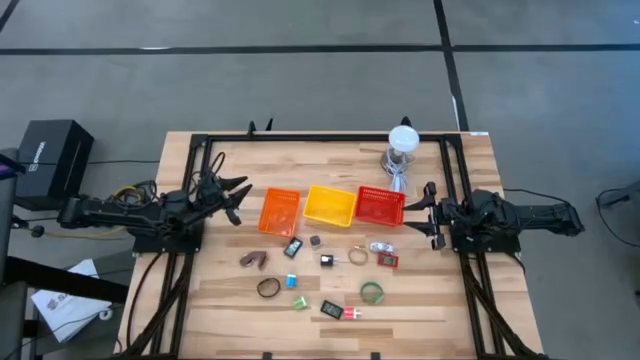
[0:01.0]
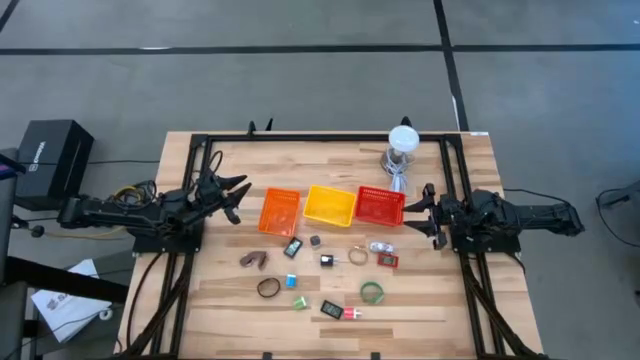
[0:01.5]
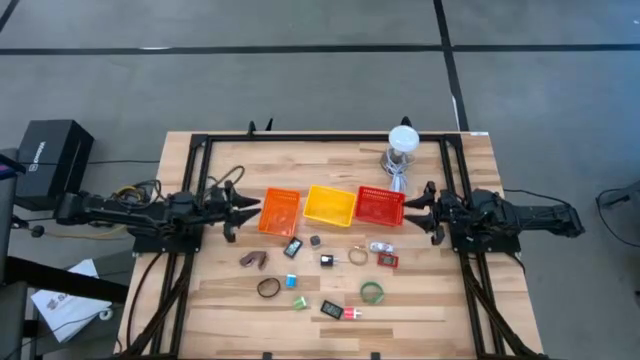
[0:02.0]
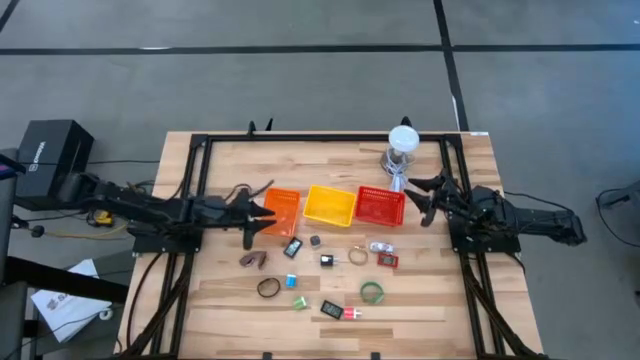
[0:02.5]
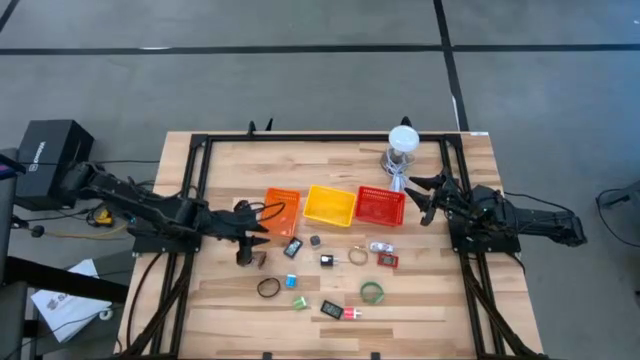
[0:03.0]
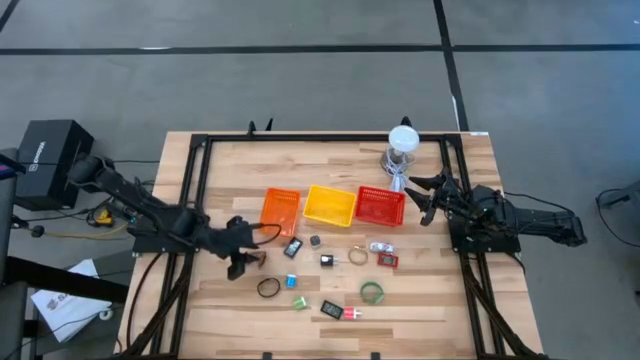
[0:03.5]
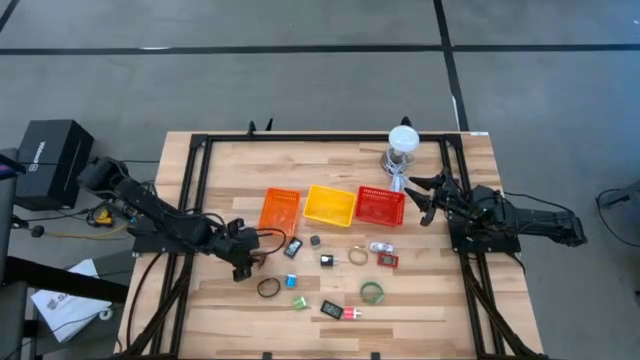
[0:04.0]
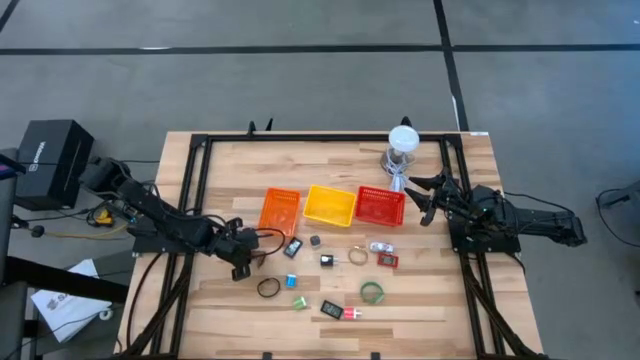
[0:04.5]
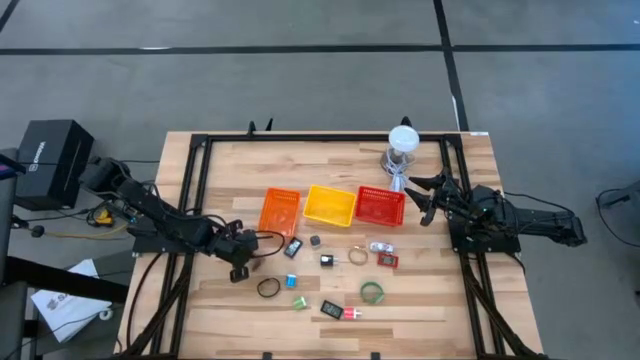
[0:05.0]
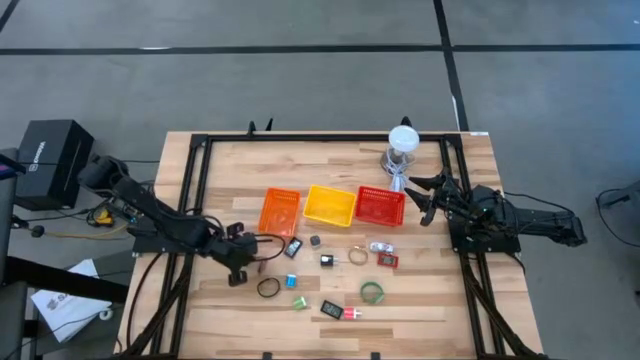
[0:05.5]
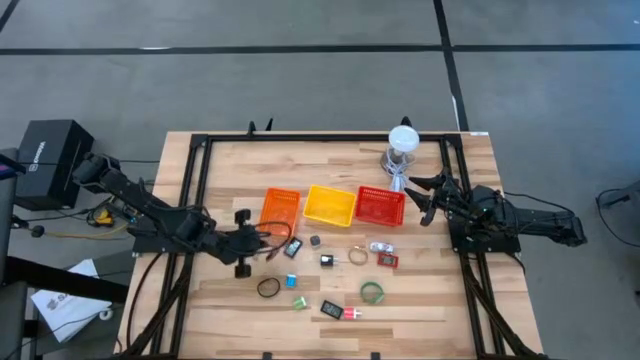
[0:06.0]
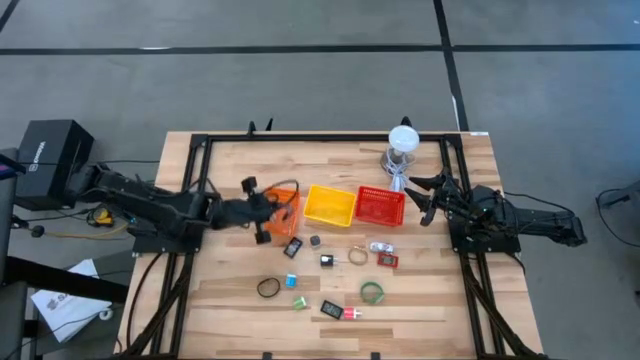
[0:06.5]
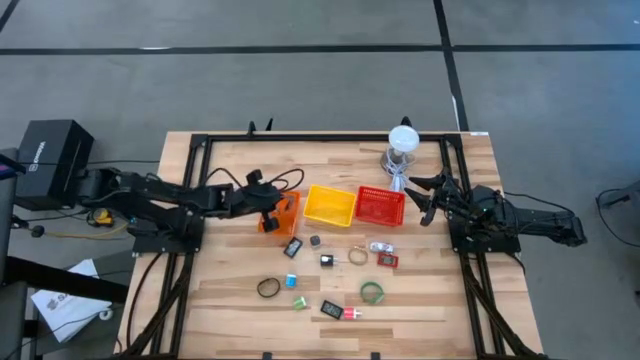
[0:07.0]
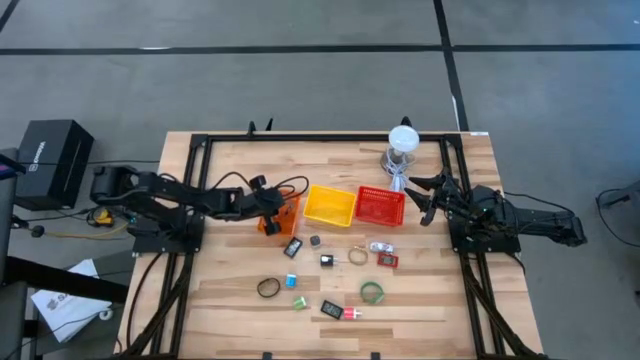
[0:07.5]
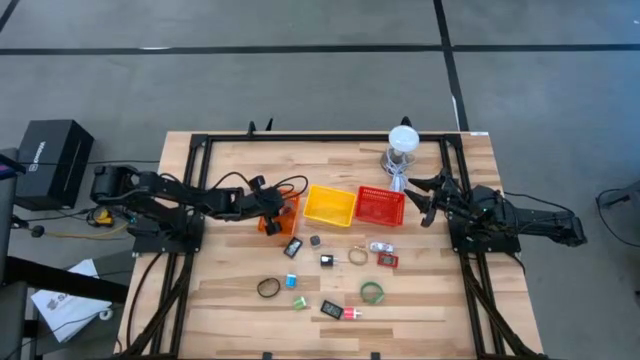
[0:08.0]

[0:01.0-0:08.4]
Task: Pick & Place Office items
Put the brown wristwatch into the orange bin

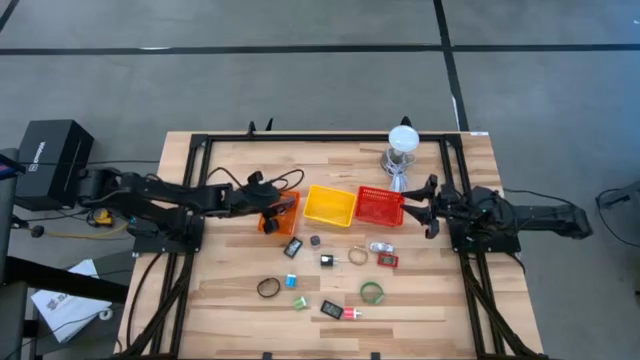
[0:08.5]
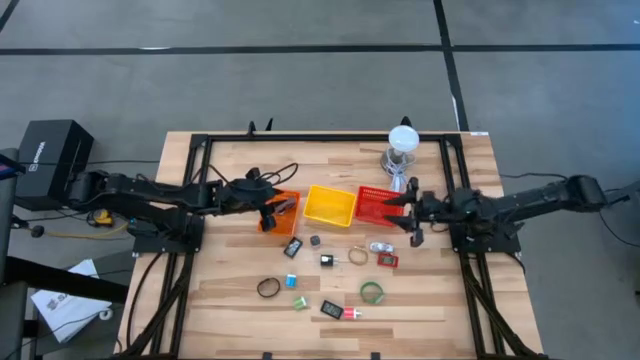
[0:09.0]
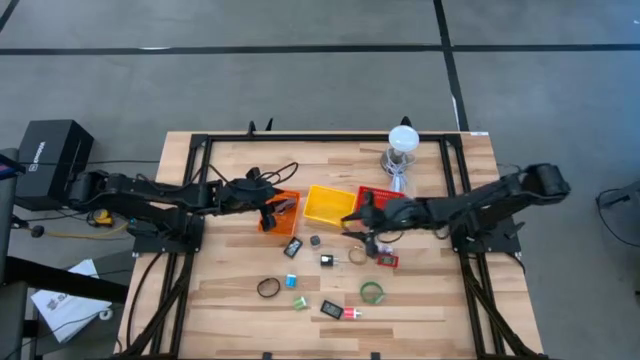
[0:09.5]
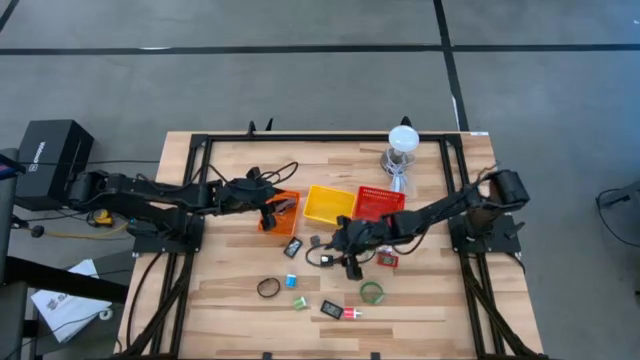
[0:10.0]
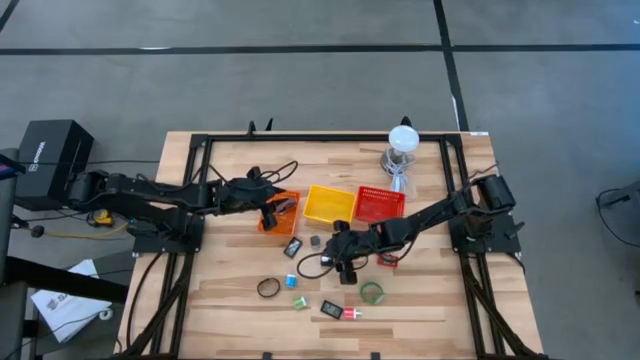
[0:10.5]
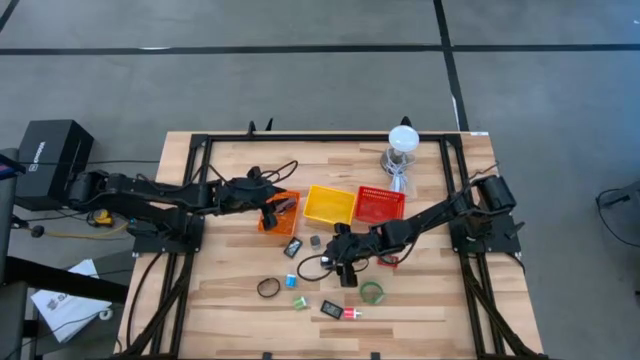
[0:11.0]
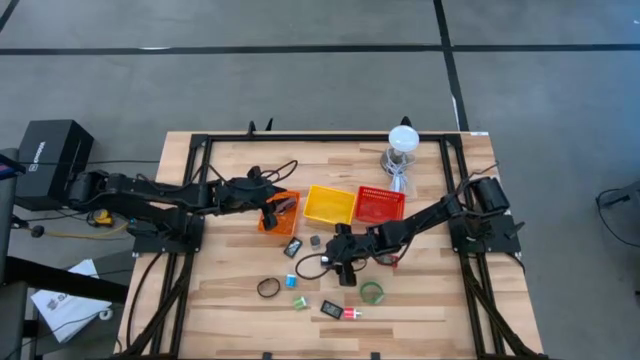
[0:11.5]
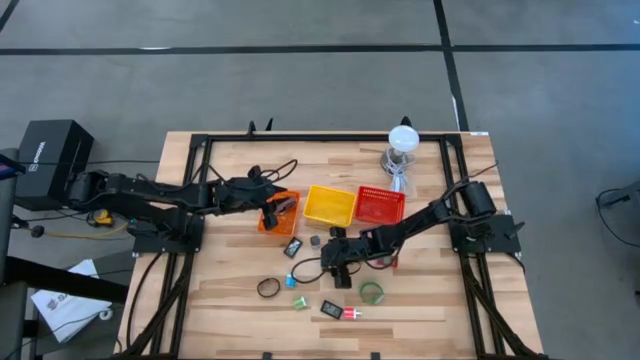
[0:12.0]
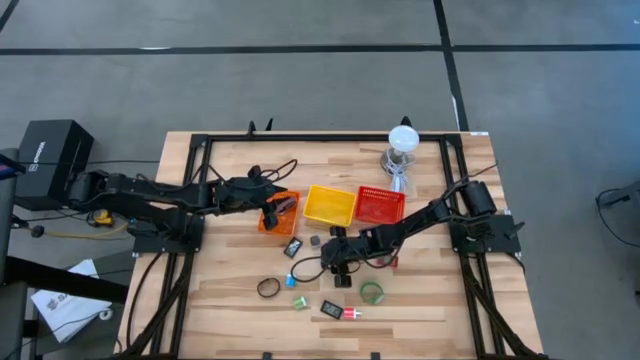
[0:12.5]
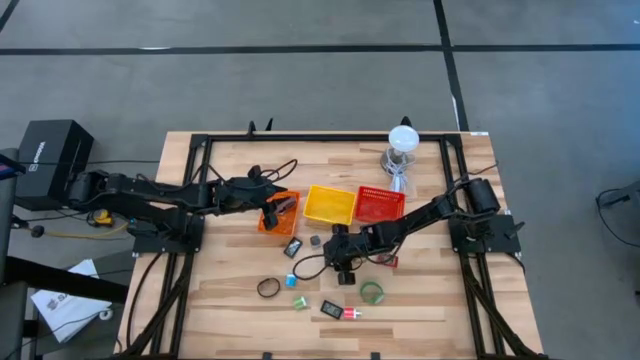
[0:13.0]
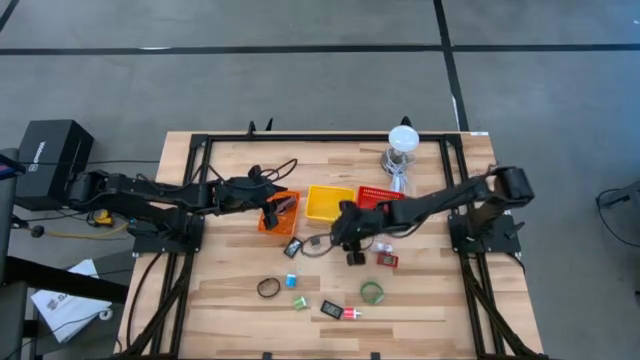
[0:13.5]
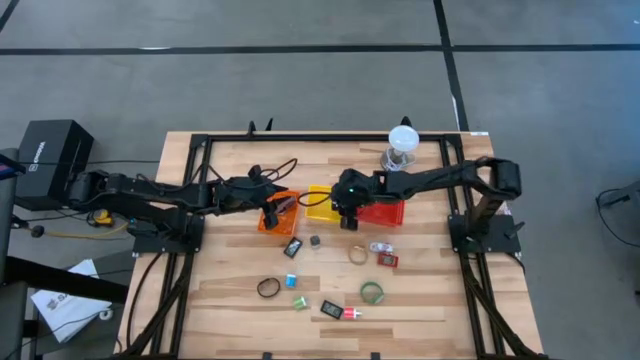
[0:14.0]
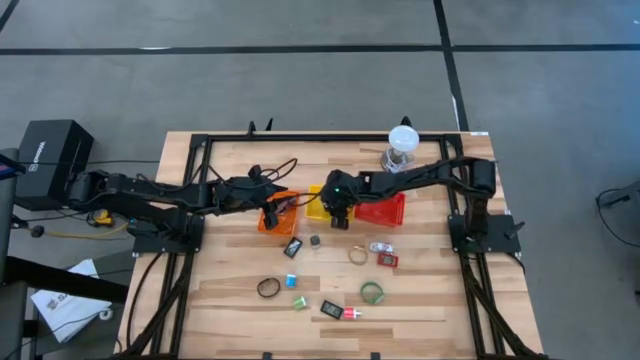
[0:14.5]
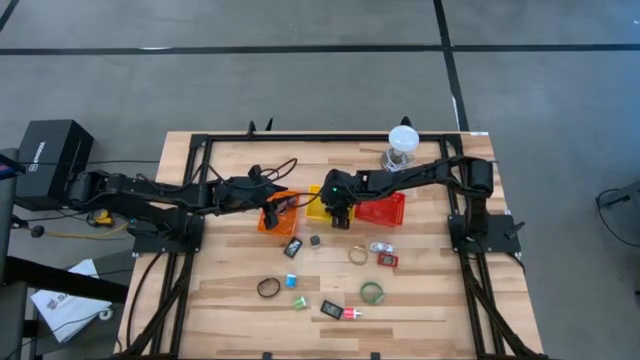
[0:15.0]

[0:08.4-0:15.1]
Put the black charger adapter into the yellow bin

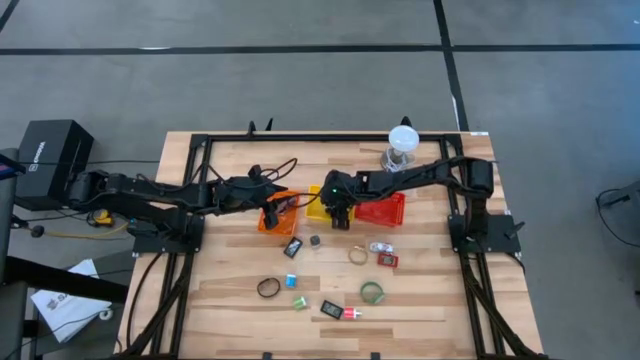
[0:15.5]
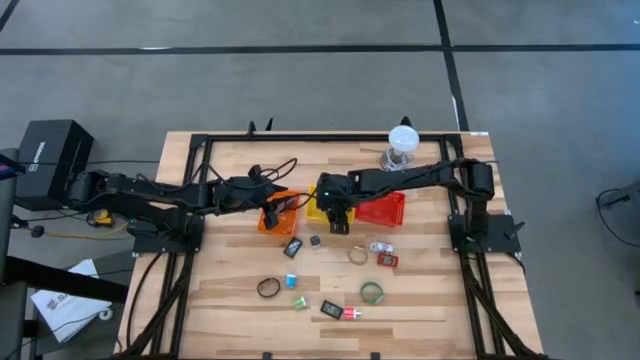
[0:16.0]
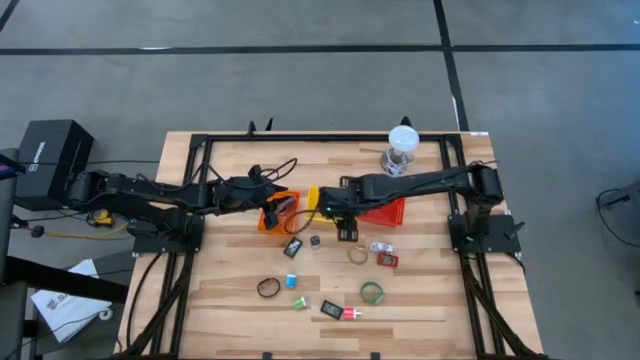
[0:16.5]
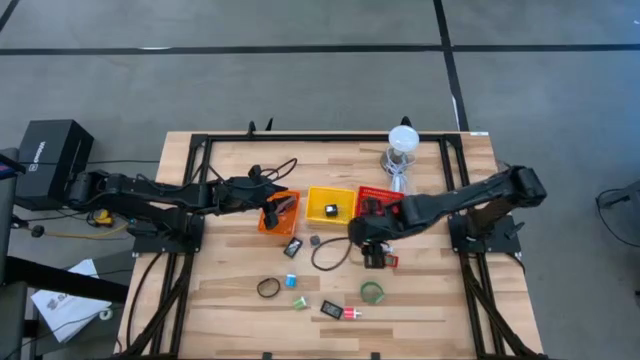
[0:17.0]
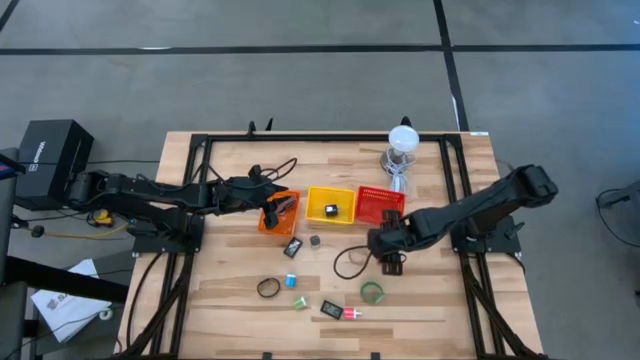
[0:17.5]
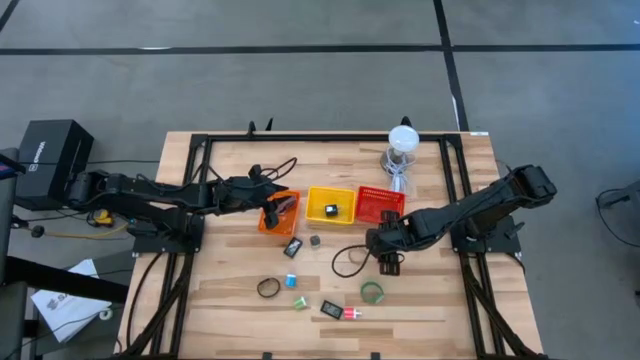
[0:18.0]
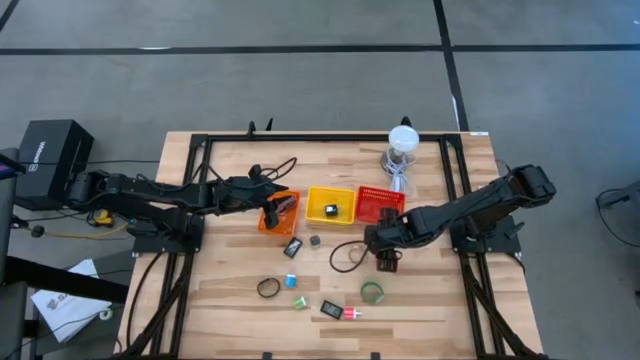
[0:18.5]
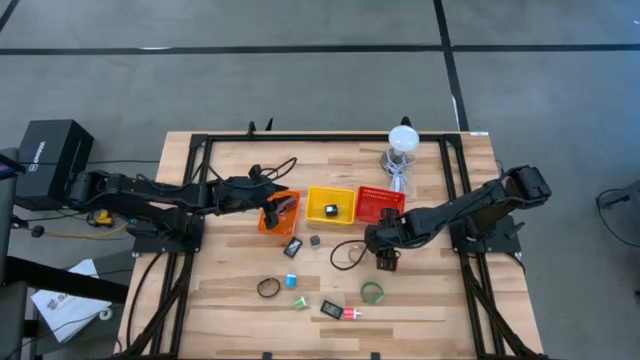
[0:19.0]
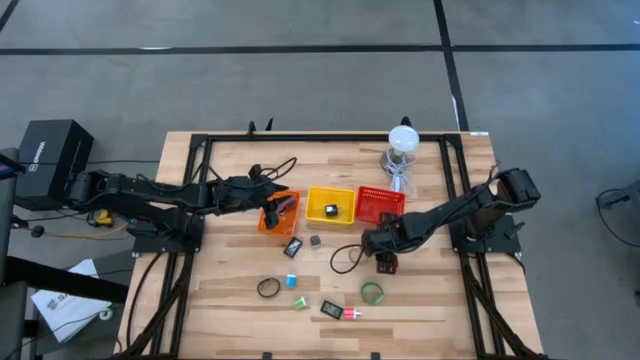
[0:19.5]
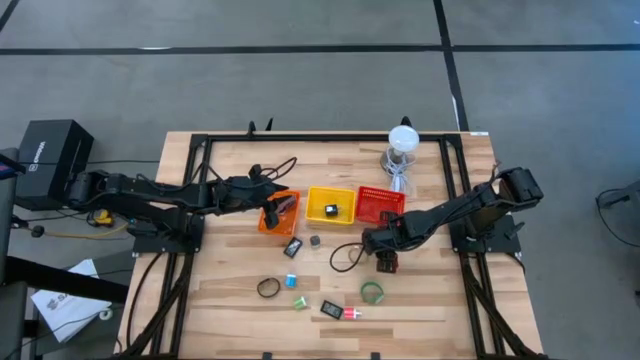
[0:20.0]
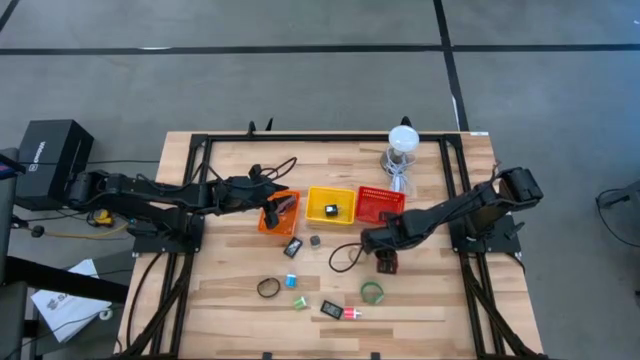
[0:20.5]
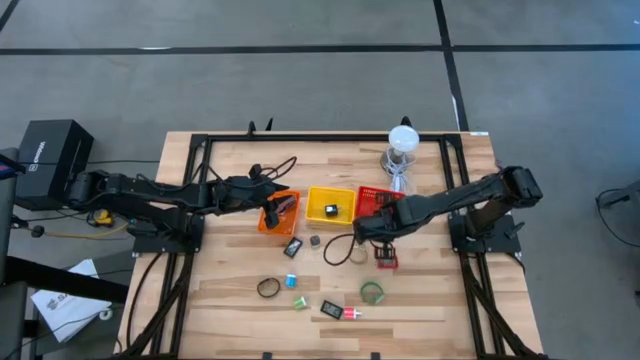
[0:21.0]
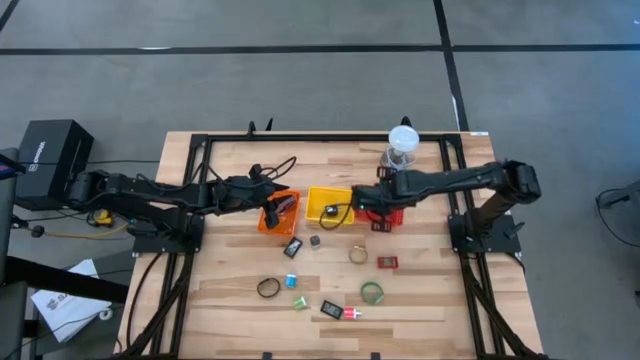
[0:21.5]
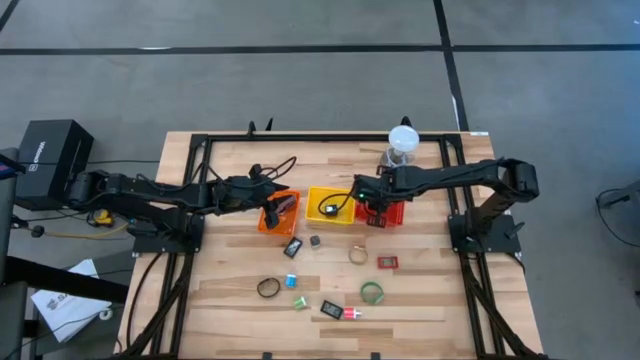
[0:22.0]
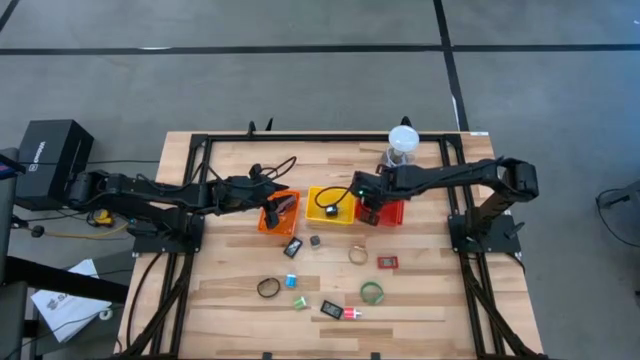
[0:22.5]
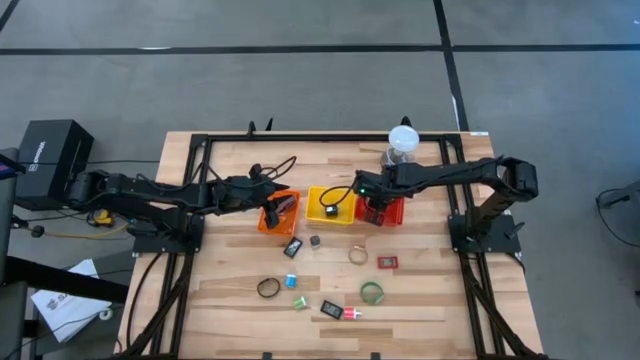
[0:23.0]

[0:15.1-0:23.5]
Put the white wristwatch into the orange bin
